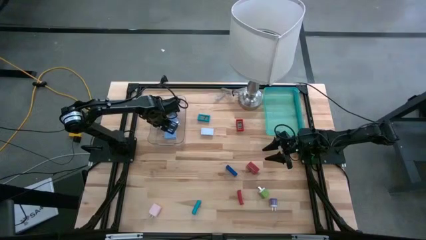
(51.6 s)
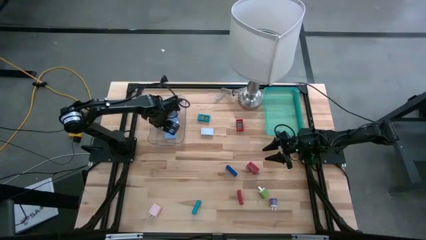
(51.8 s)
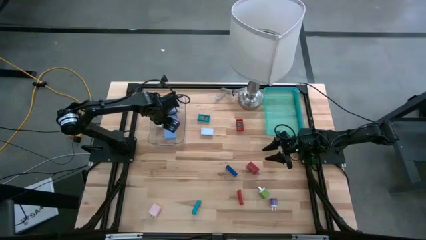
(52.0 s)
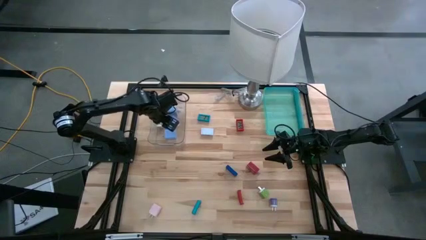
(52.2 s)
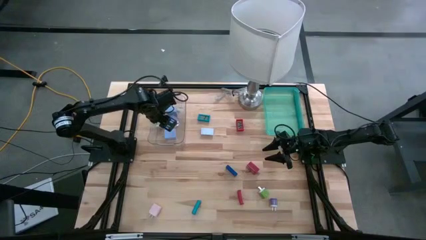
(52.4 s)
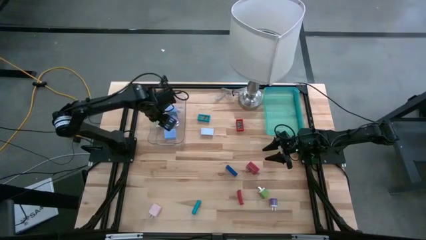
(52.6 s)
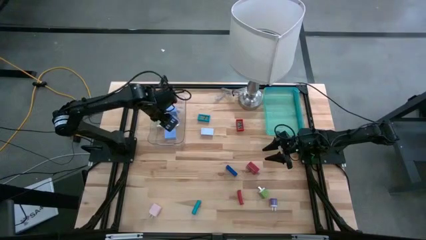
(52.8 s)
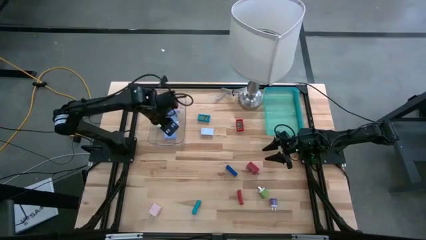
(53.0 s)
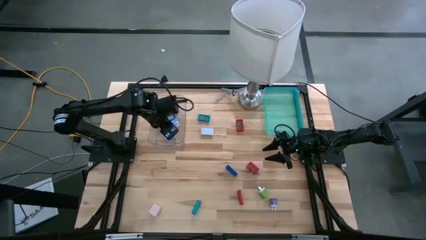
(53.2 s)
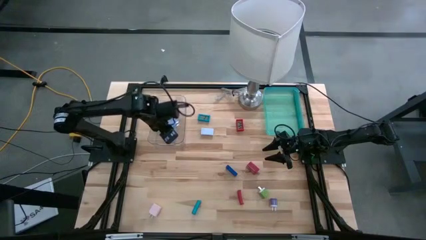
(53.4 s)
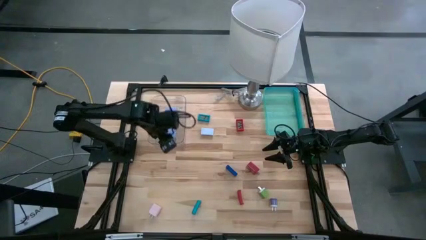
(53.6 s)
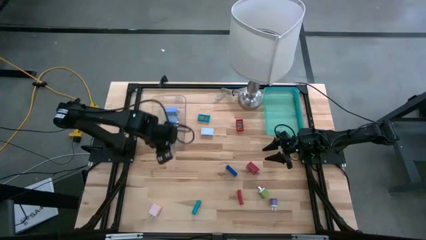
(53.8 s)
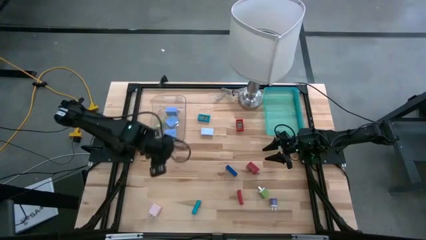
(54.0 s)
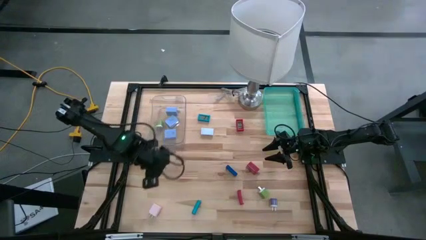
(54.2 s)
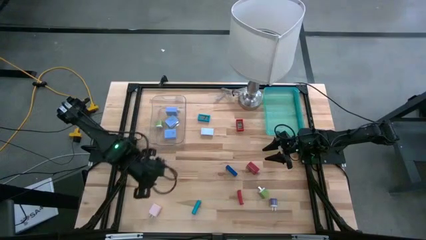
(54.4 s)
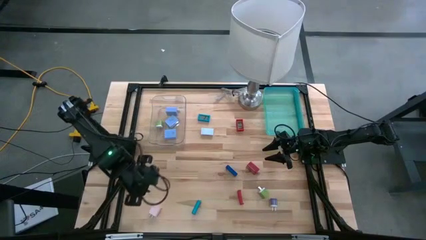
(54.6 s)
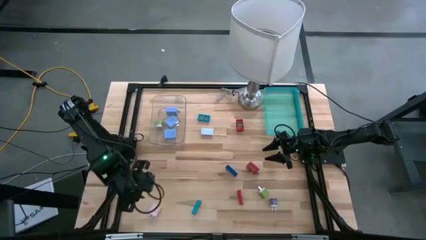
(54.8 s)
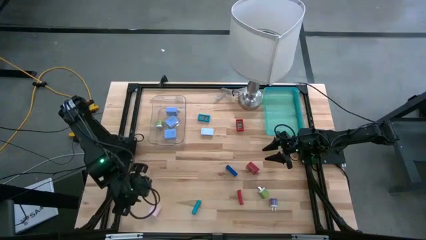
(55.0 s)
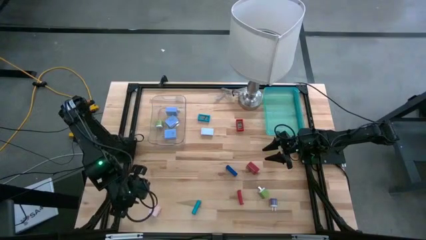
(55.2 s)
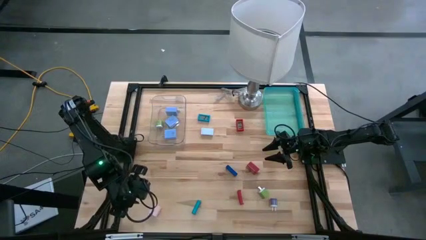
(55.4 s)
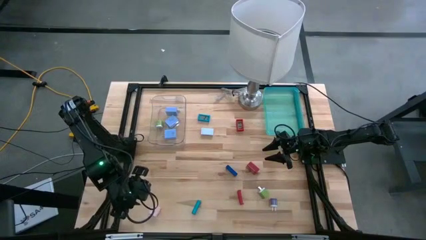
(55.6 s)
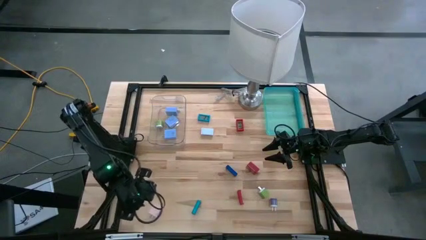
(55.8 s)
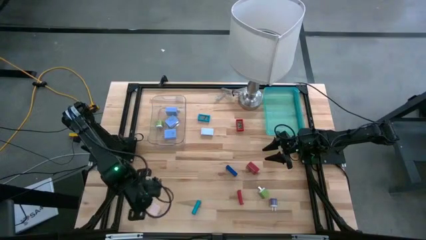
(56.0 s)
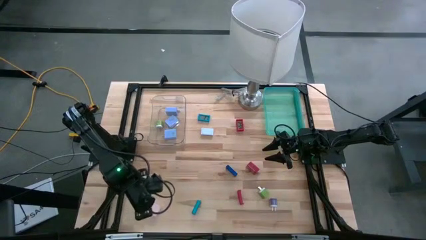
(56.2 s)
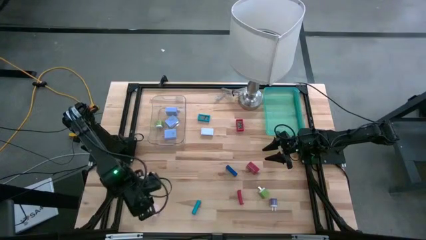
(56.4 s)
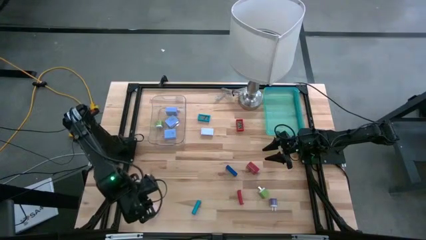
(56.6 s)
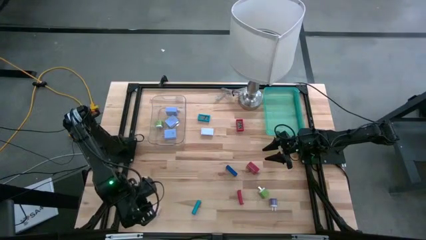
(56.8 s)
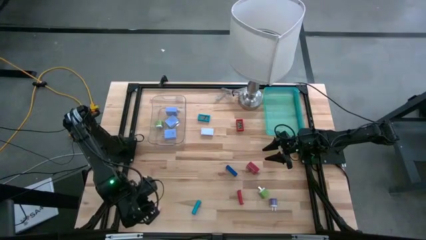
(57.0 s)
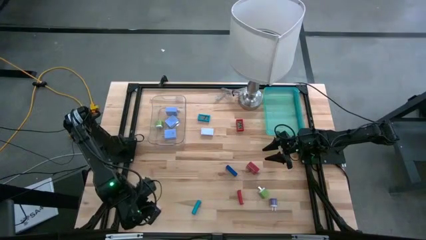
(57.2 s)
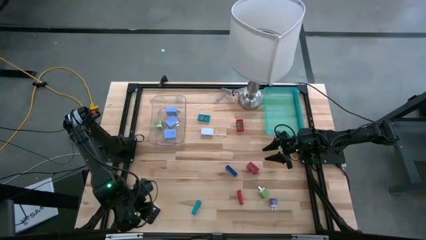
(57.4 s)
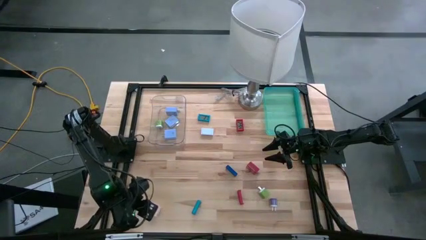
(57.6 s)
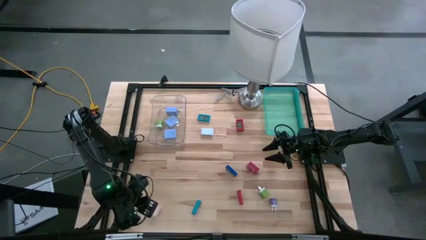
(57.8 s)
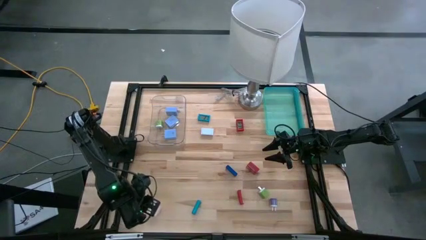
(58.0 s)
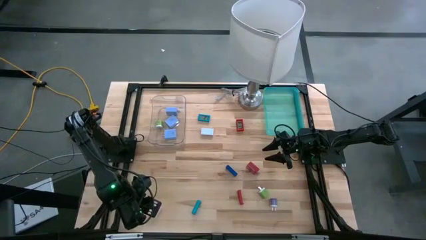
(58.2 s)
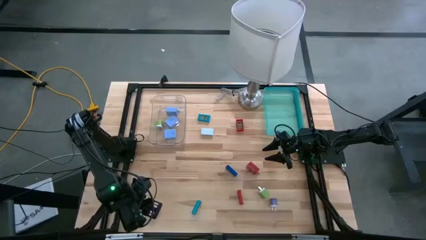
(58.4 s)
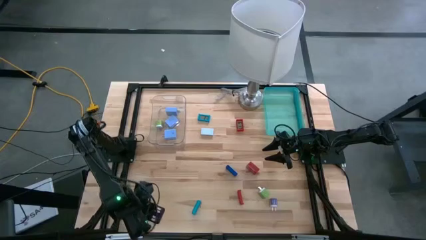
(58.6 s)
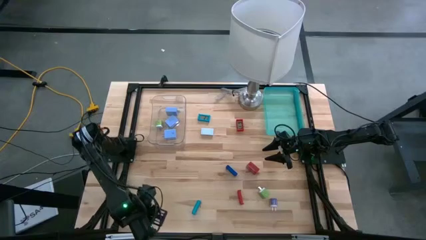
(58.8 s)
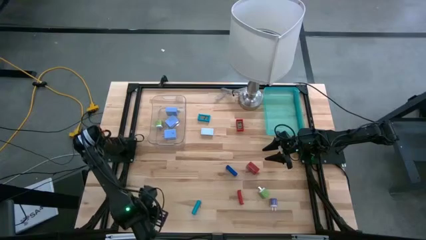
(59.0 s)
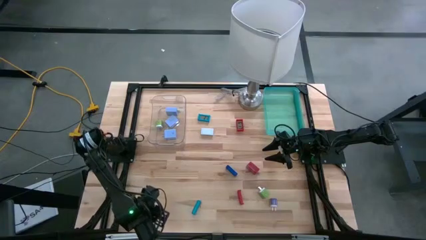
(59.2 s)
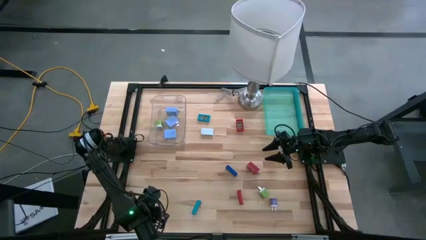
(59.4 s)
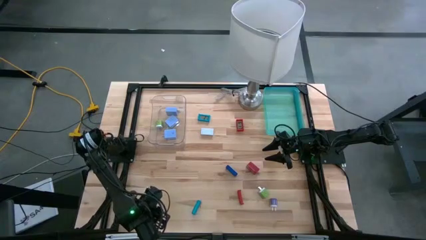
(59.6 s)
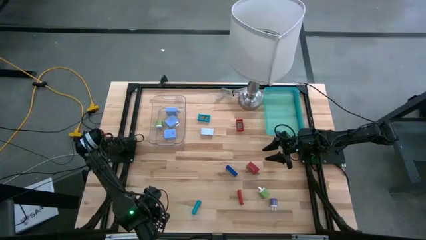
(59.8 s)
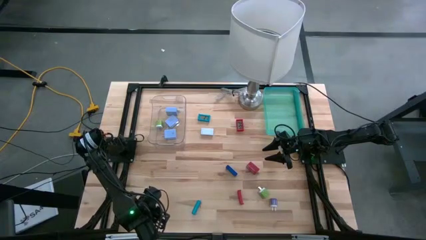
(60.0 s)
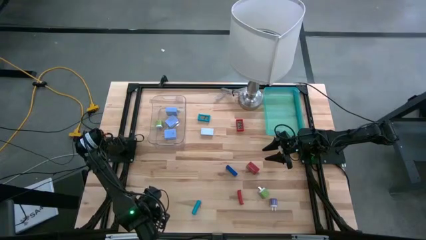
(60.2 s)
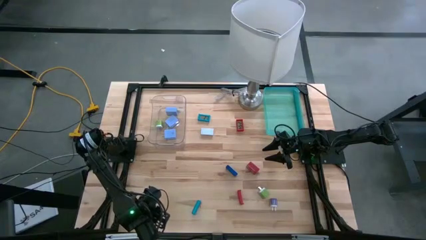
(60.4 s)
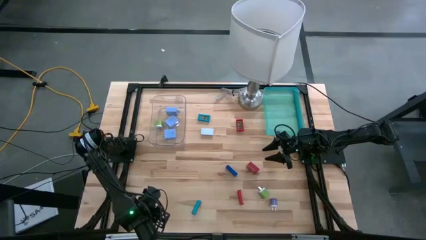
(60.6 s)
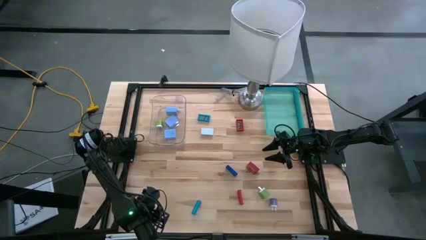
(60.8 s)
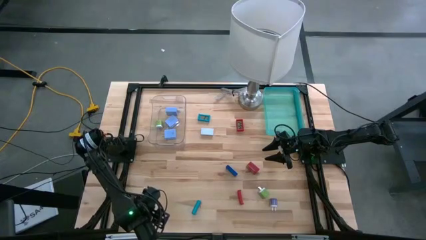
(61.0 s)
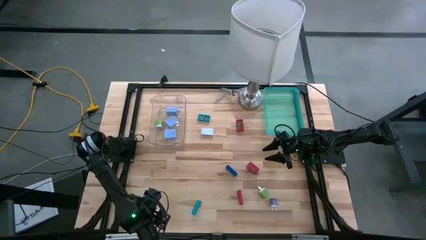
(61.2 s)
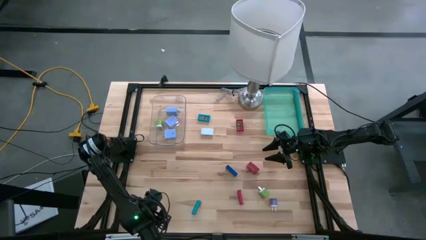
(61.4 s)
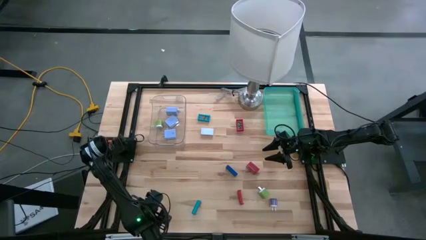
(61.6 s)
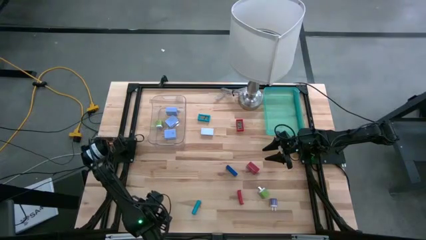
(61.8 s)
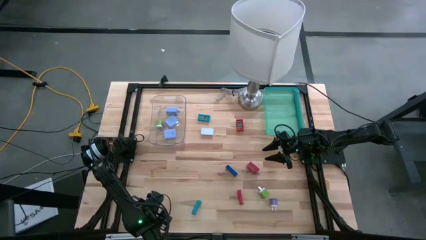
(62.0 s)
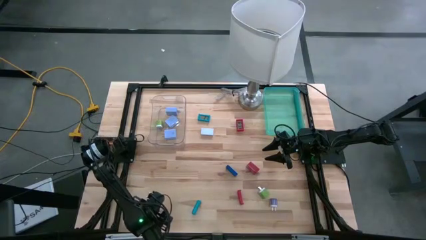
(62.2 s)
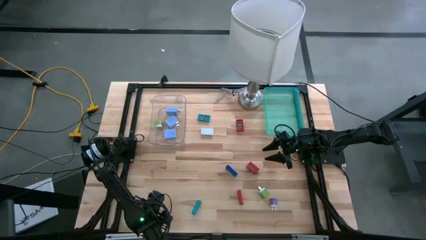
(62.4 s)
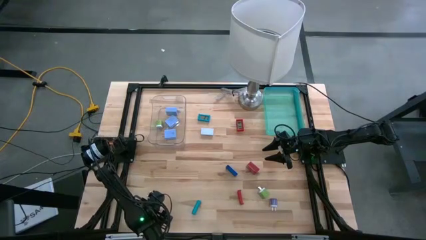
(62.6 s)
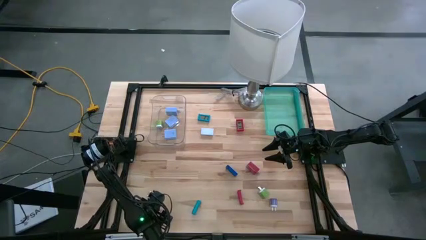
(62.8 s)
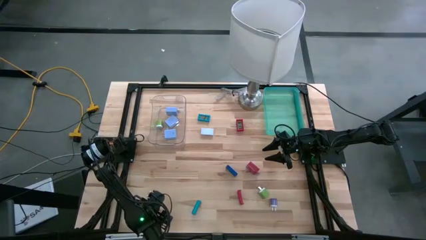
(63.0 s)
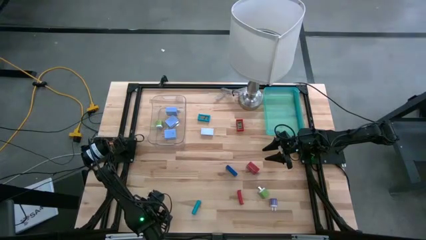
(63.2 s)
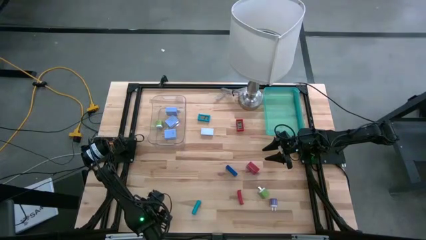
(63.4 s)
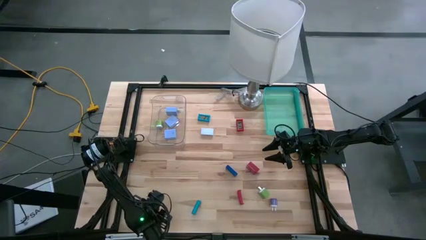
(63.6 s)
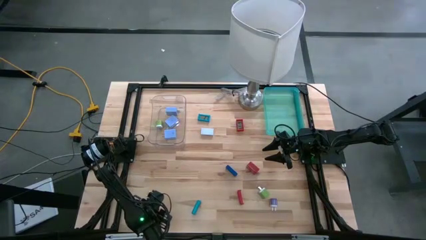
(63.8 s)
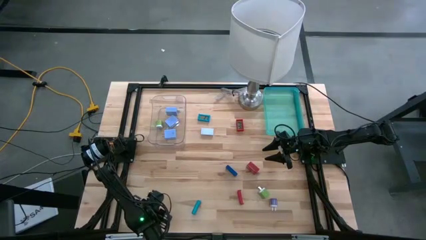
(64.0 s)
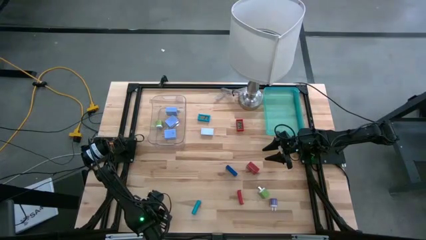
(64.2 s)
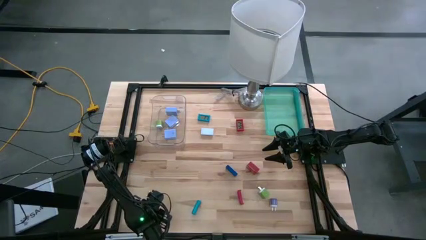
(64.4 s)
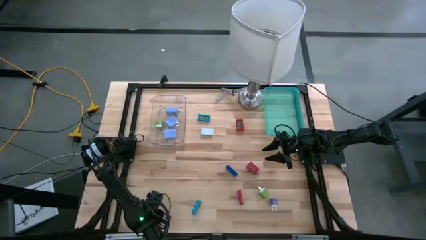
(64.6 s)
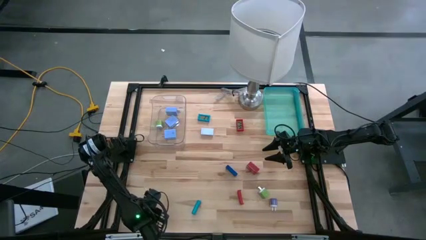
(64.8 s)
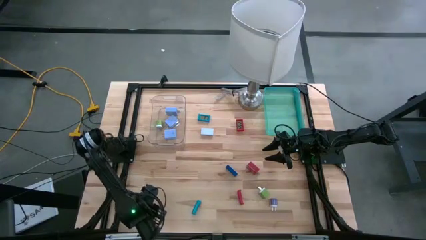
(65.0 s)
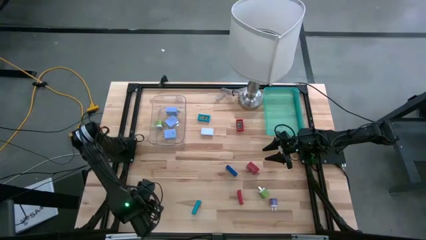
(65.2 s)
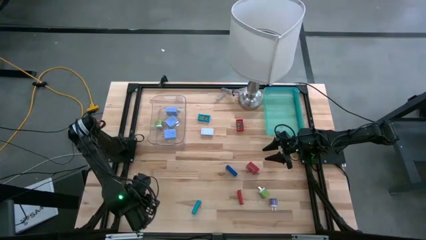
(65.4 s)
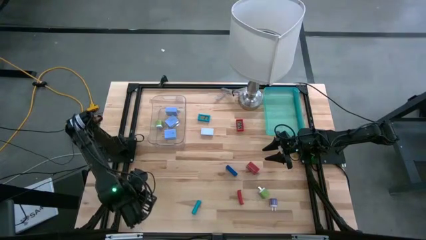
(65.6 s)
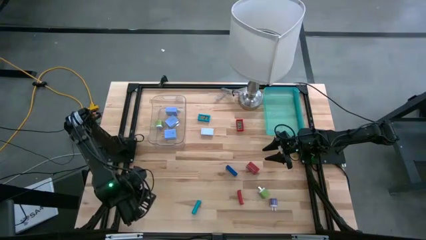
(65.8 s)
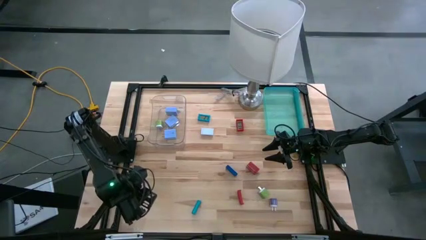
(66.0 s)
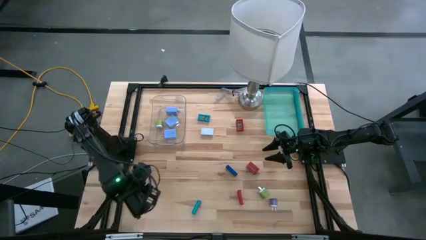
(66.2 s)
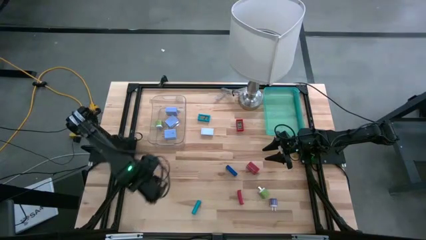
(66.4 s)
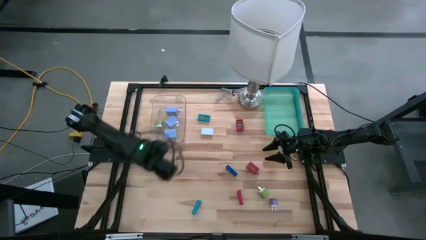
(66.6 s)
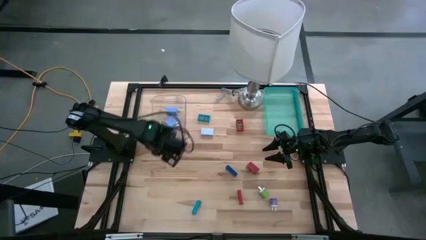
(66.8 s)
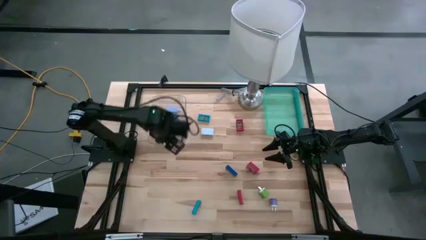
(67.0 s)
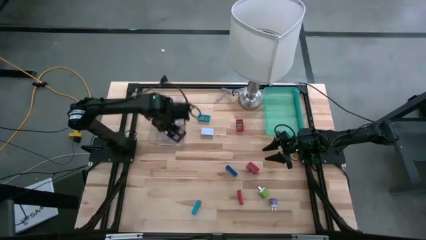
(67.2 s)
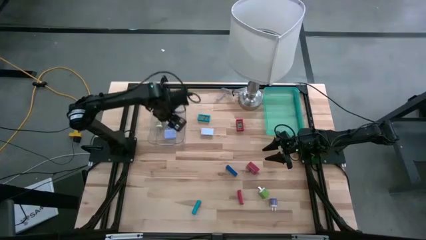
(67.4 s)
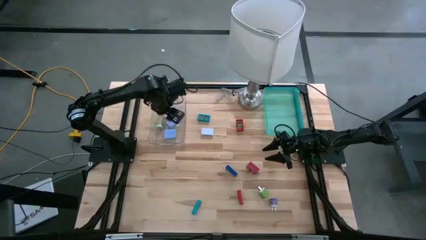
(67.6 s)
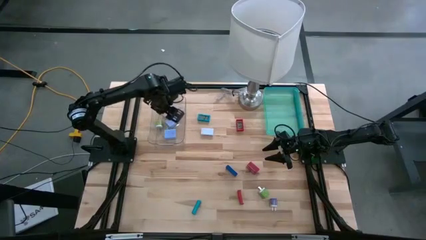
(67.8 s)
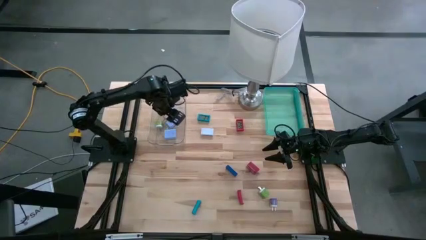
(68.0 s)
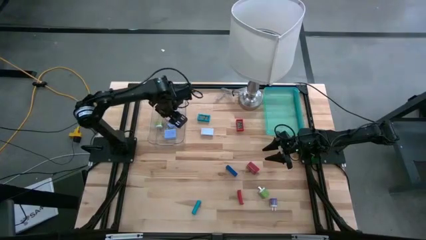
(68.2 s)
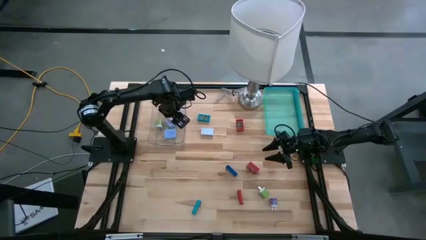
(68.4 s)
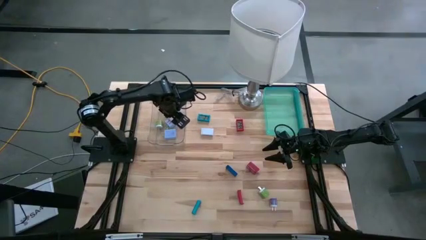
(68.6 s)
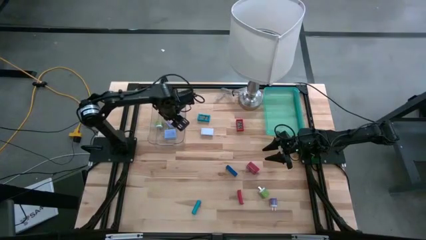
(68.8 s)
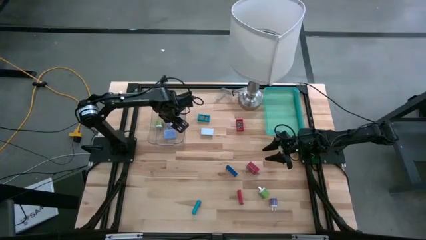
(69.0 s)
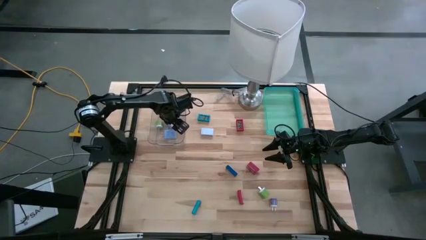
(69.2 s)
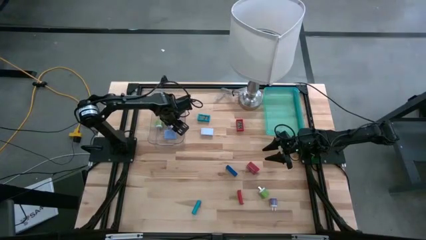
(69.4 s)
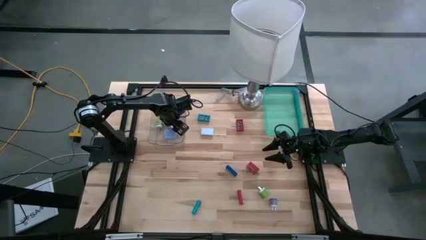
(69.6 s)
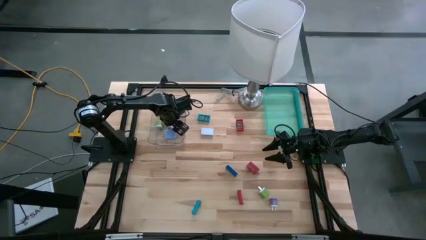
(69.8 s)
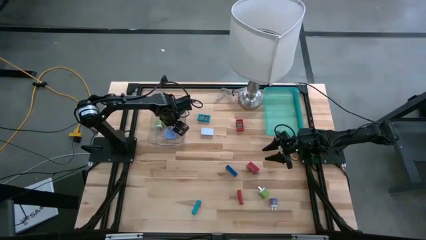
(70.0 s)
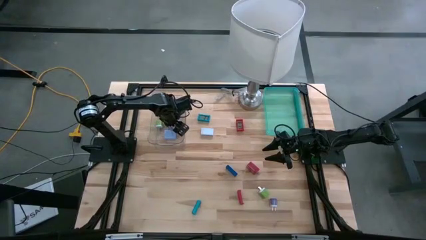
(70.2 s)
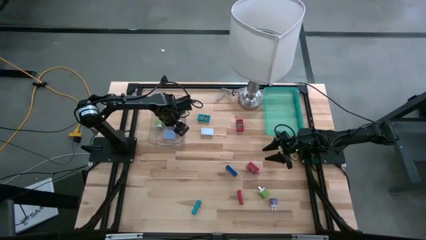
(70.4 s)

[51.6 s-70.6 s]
Task: Pick & Place Office items
Put the pink charger adapter into the transparent bin
